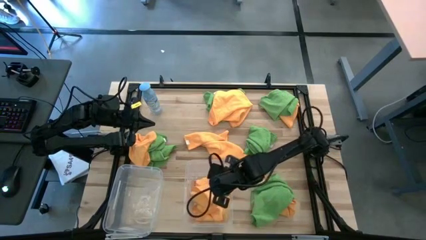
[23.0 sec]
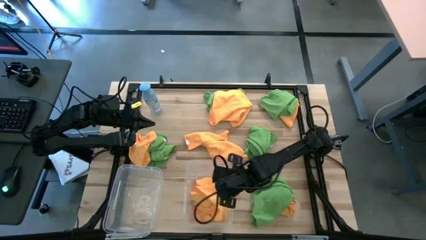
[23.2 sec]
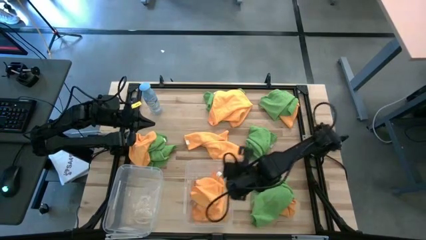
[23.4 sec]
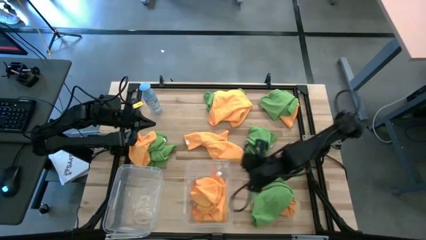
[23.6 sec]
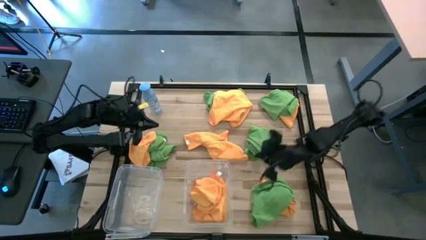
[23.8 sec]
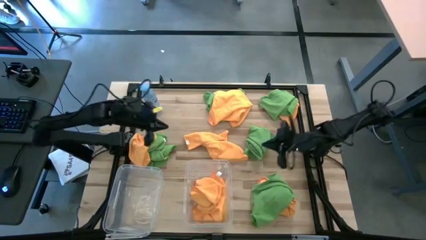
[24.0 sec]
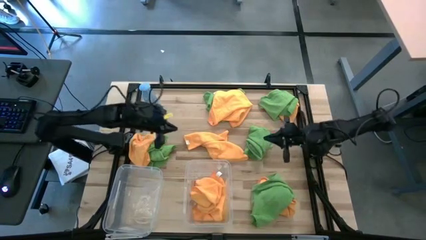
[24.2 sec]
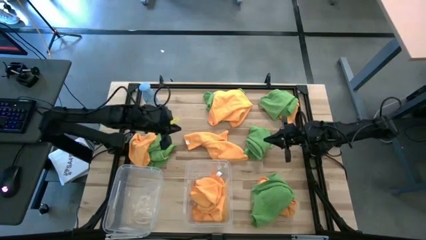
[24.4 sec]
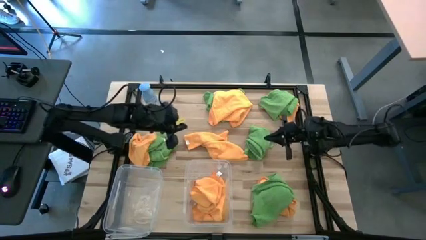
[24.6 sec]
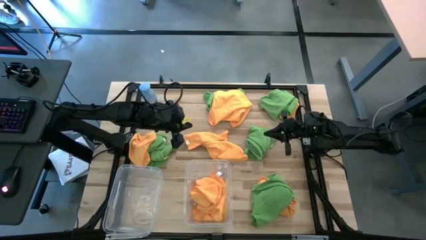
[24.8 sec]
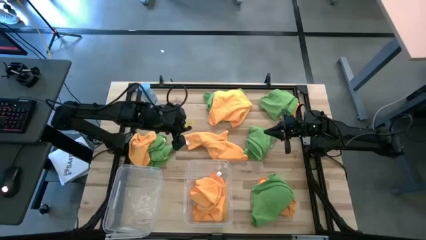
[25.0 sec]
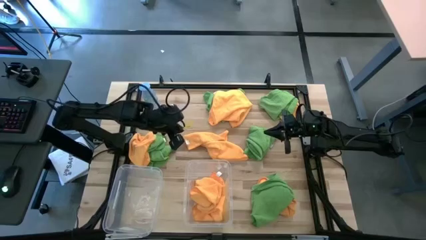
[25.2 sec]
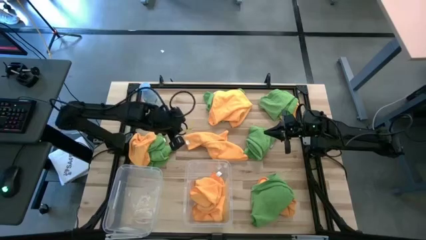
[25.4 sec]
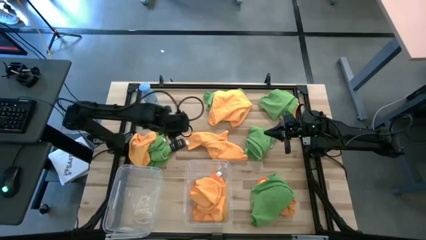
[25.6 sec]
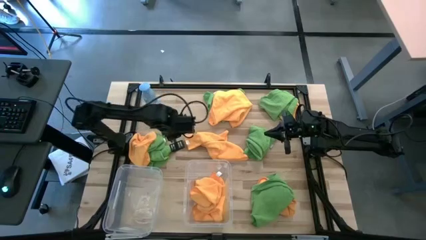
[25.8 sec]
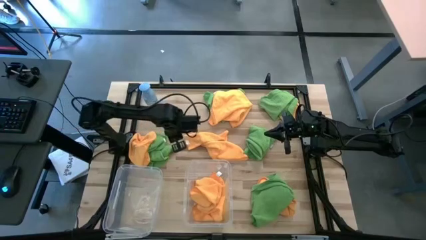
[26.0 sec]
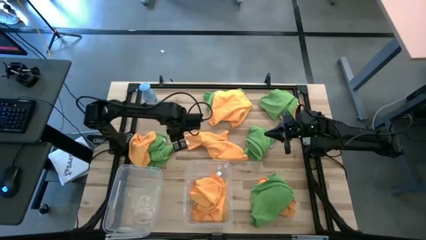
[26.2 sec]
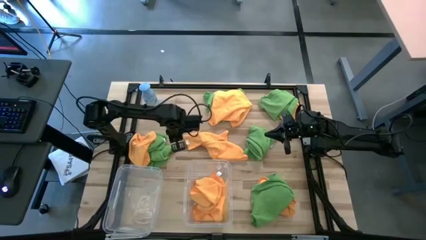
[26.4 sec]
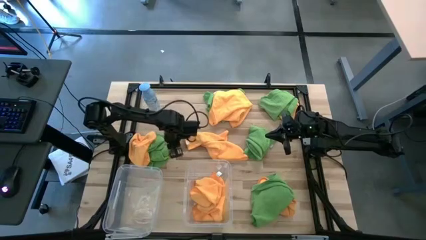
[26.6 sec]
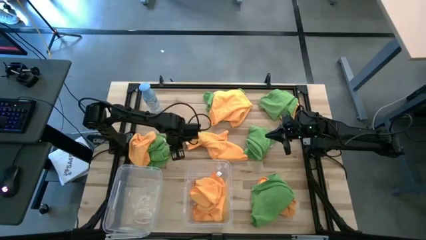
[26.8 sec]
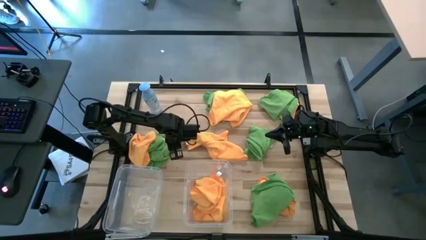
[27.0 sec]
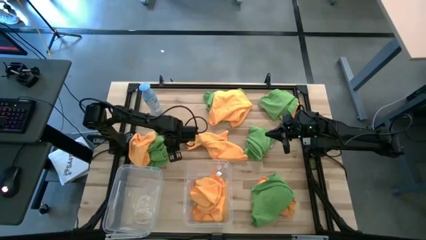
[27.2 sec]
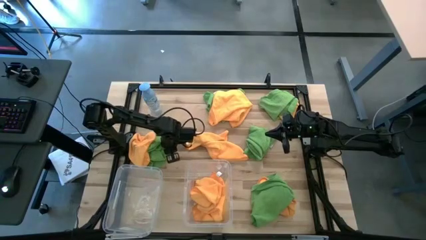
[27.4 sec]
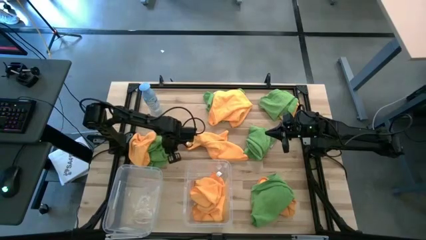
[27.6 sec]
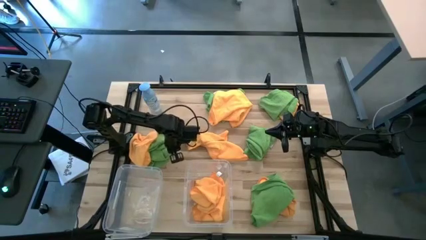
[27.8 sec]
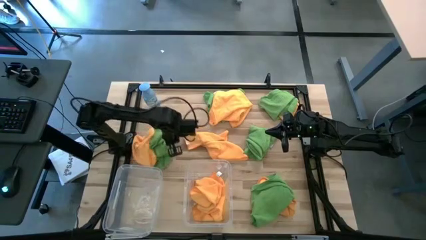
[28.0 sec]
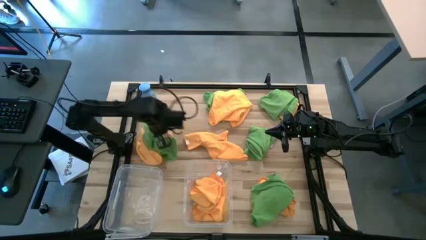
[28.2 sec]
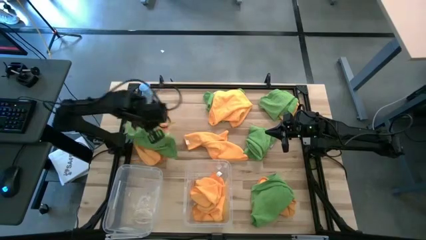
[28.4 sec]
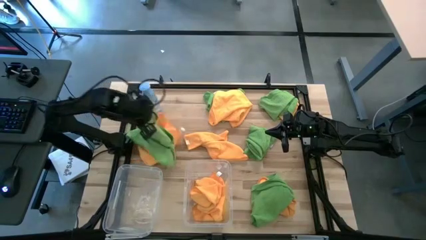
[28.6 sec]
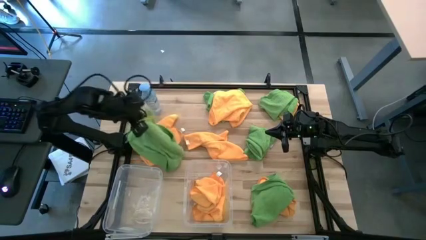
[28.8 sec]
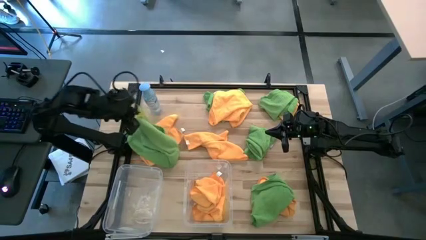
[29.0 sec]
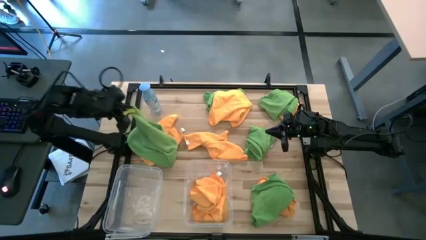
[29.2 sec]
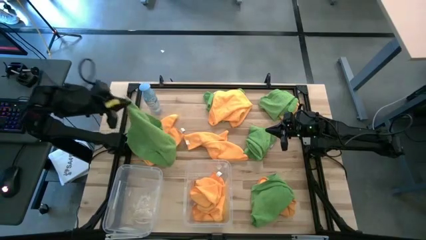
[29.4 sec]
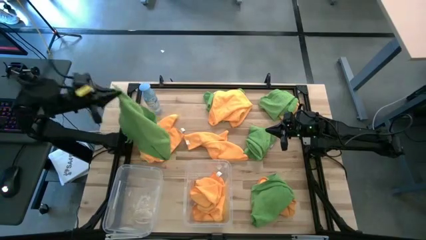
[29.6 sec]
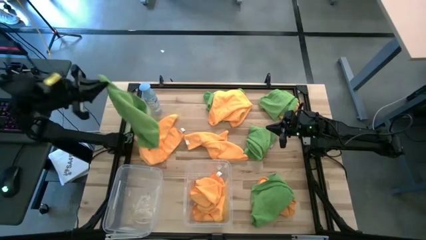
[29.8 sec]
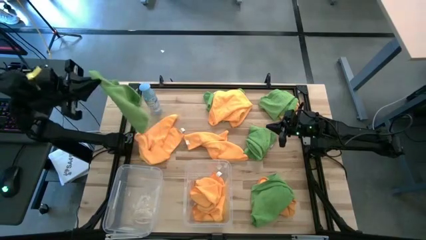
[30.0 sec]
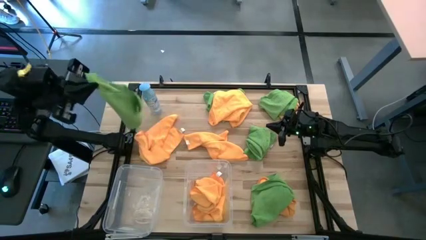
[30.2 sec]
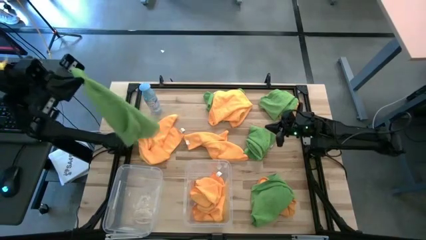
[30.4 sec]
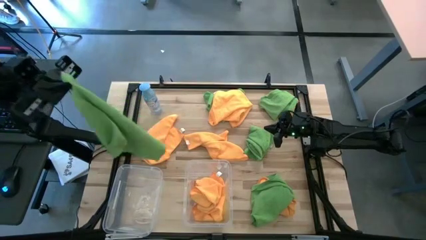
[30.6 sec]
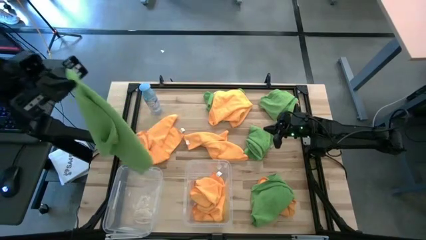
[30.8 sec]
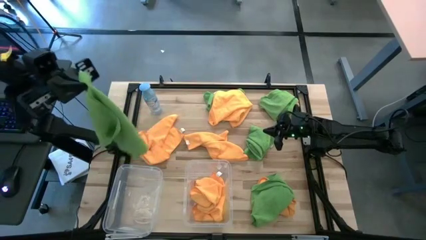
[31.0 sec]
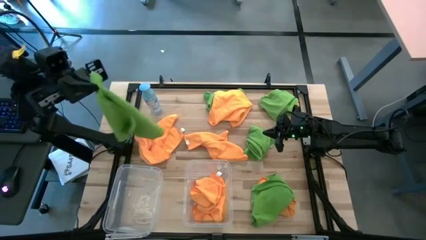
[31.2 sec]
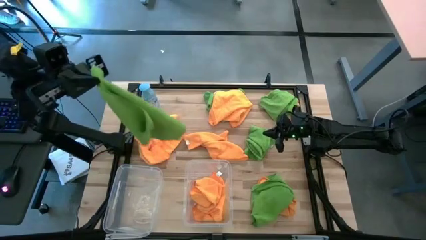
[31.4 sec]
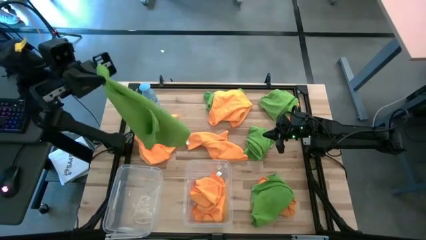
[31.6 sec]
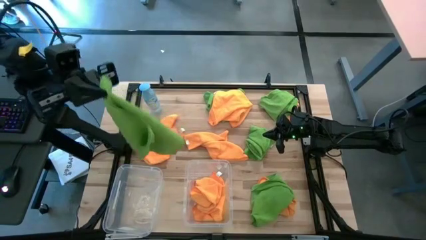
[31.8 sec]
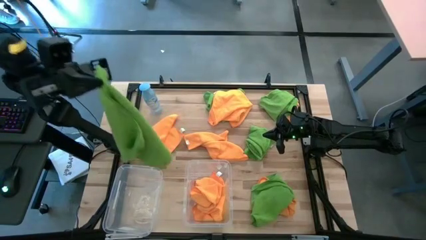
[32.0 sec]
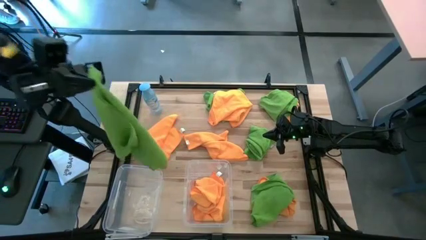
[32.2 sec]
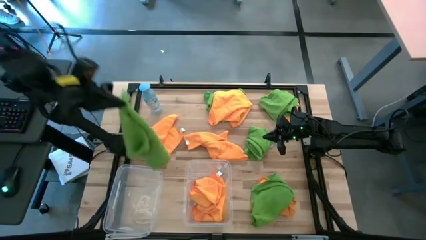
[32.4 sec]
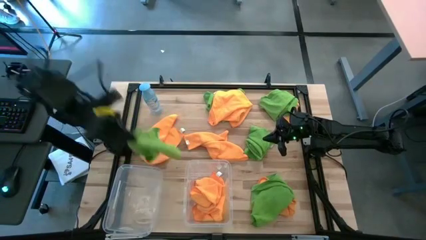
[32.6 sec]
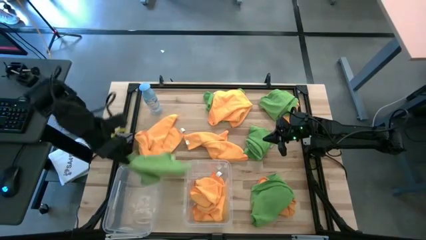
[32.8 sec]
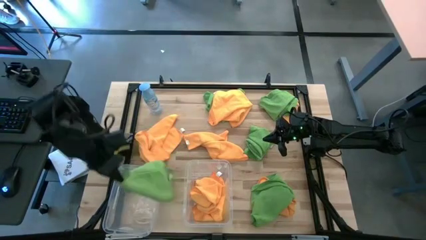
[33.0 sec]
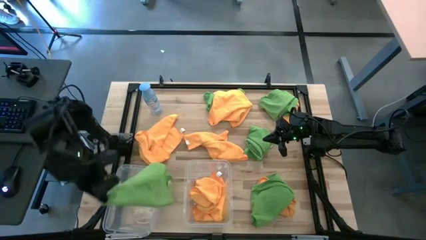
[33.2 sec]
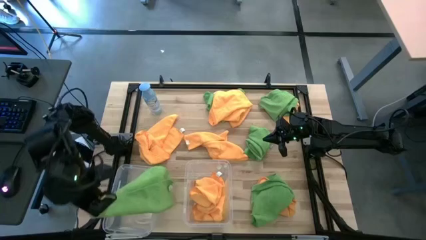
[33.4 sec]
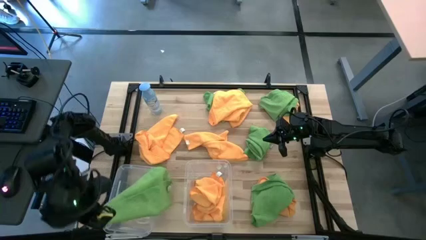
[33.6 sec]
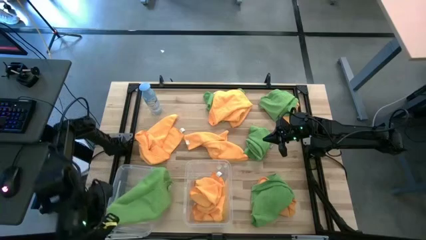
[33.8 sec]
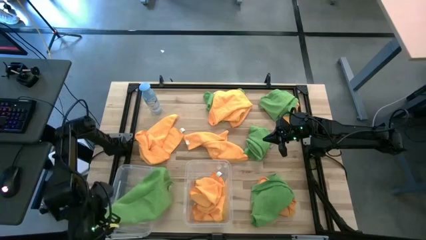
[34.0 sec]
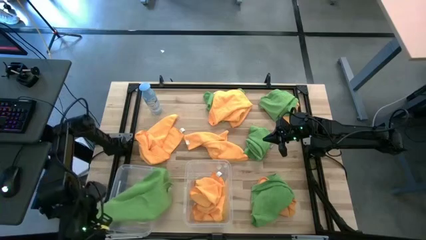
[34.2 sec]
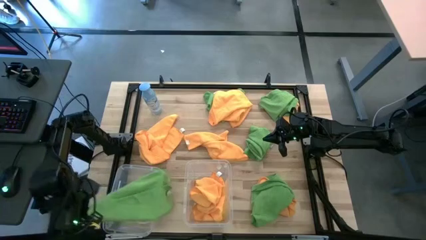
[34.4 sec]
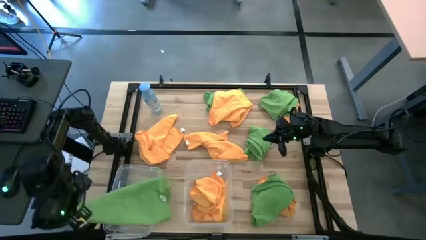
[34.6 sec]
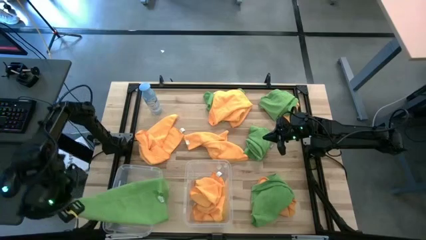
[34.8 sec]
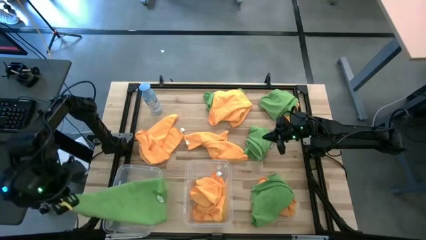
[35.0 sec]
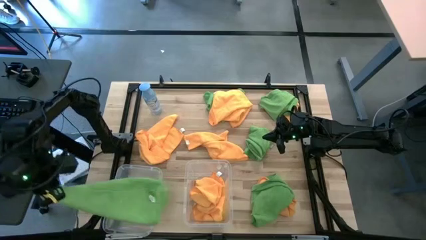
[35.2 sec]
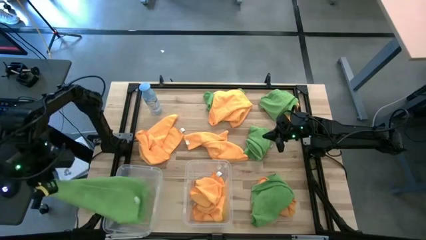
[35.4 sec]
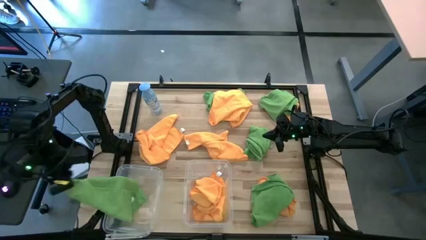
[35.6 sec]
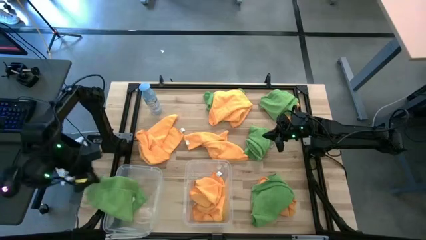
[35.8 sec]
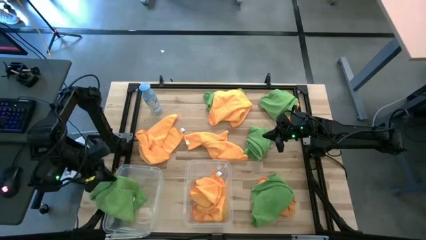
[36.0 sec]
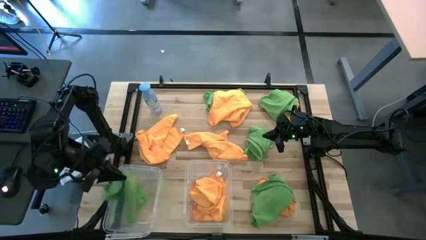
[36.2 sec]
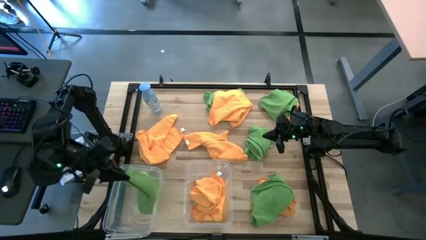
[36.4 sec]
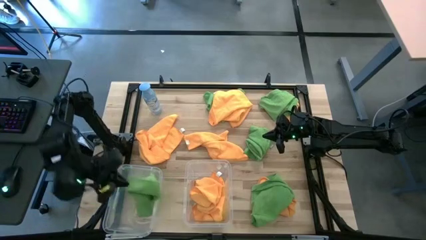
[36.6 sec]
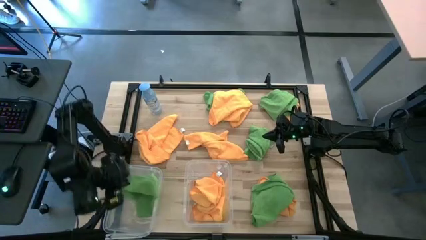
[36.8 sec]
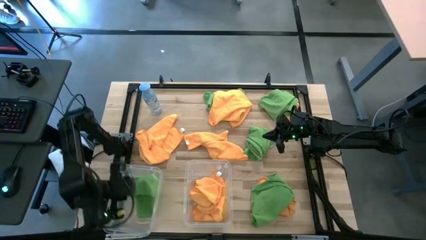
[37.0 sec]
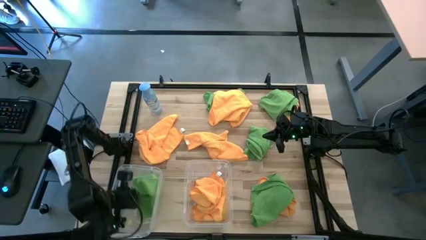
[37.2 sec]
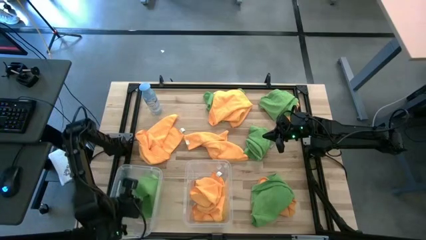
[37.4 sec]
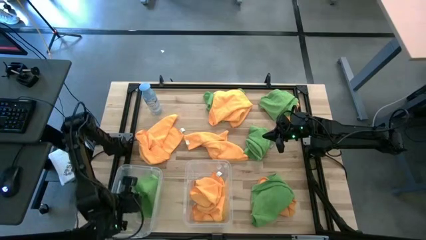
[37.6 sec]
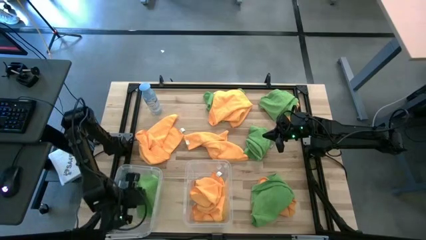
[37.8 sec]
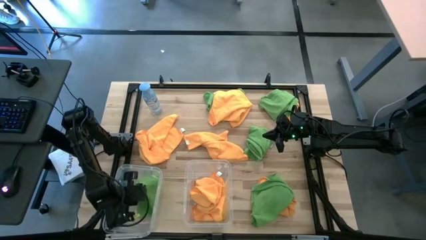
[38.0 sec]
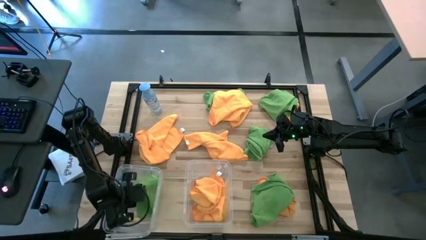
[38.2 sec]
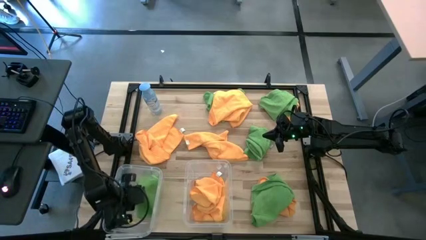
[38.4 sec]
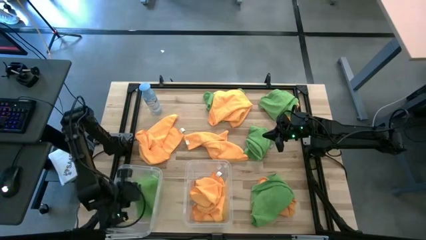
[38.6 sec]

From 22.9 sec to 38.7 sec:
Task: Sort microfiber towel by color & place in baskets
Put the green towel into the left transparent bin
